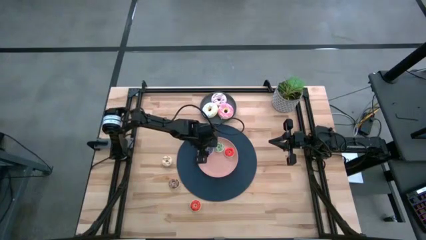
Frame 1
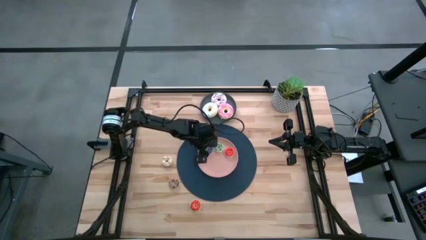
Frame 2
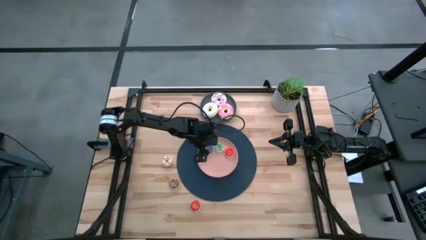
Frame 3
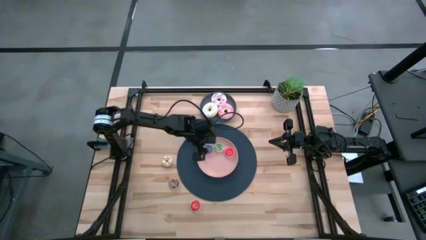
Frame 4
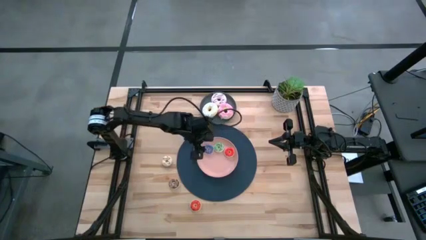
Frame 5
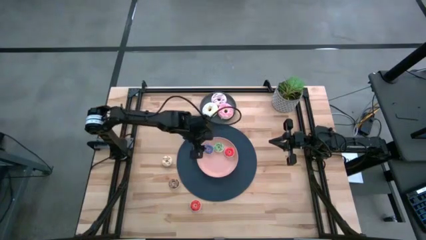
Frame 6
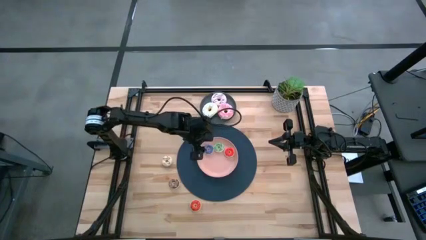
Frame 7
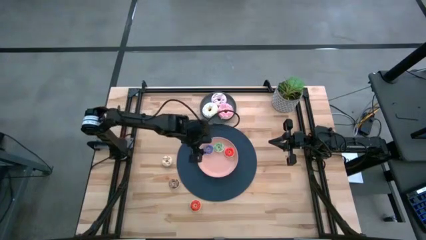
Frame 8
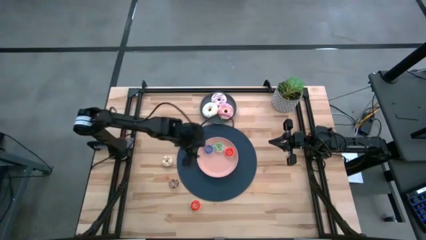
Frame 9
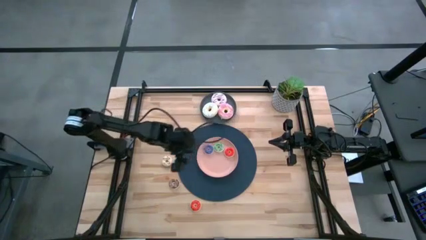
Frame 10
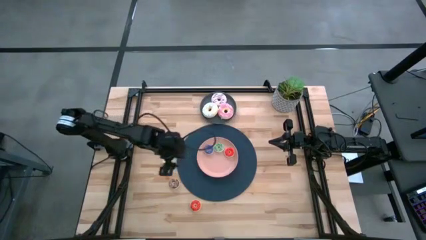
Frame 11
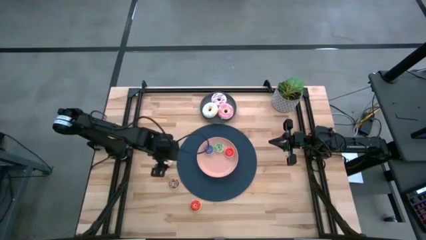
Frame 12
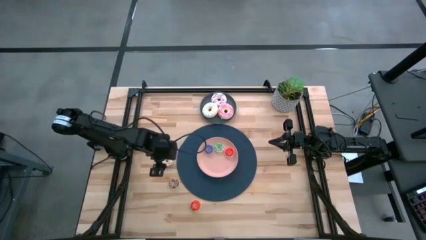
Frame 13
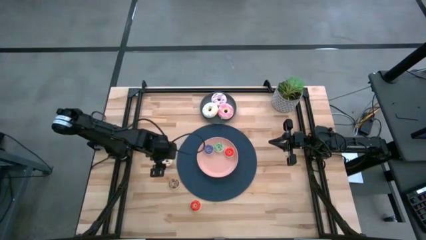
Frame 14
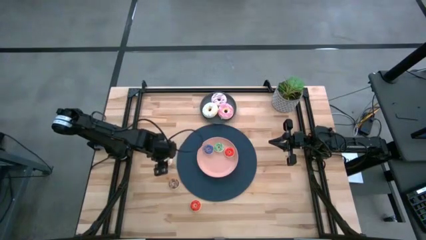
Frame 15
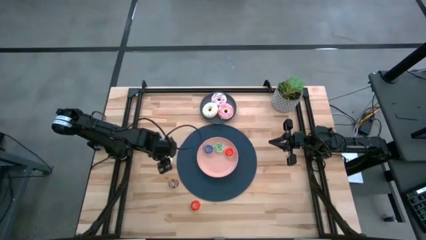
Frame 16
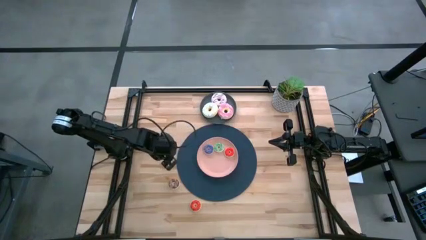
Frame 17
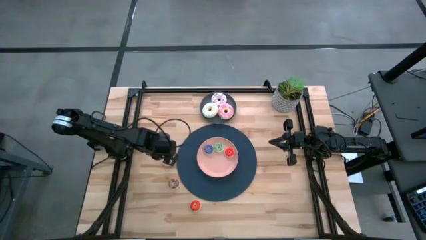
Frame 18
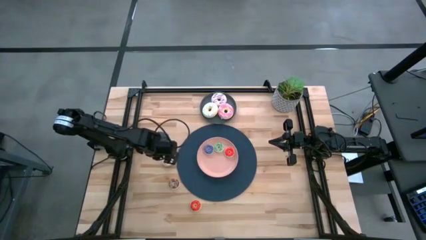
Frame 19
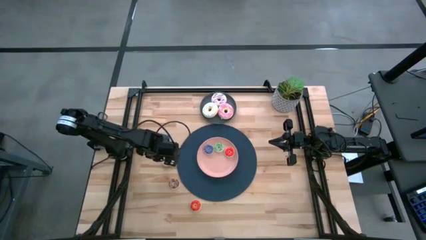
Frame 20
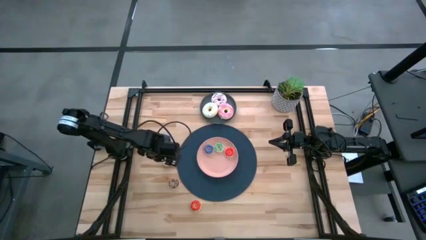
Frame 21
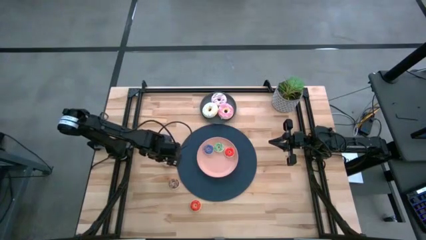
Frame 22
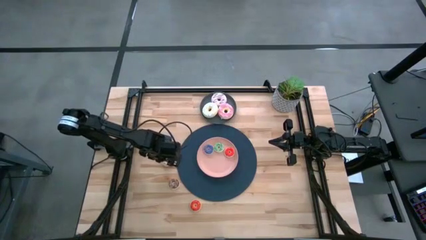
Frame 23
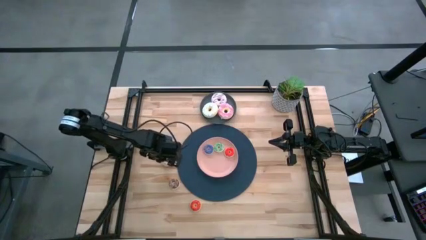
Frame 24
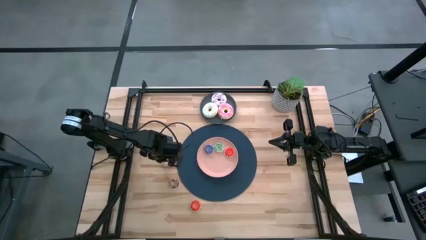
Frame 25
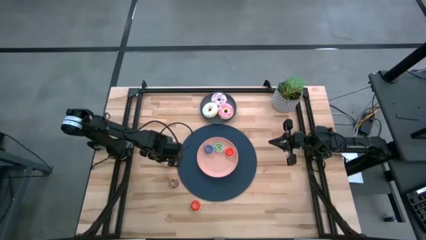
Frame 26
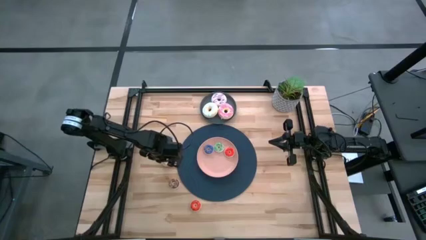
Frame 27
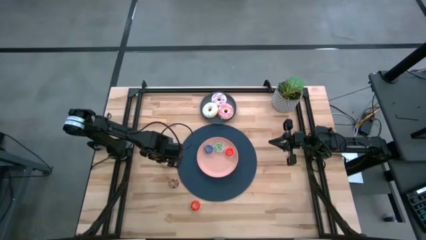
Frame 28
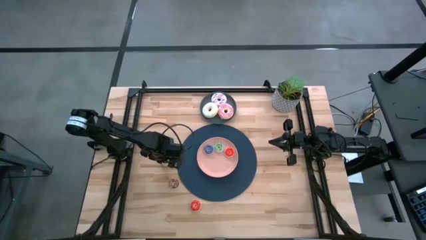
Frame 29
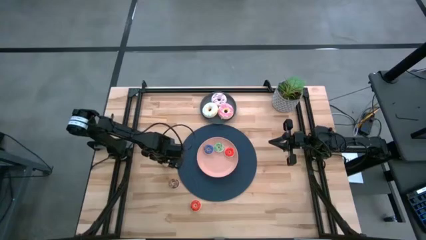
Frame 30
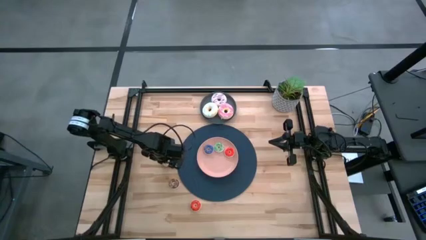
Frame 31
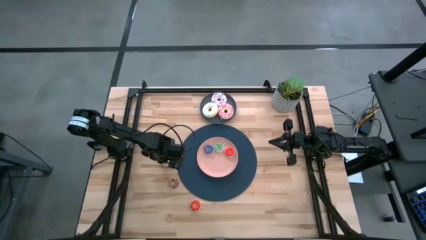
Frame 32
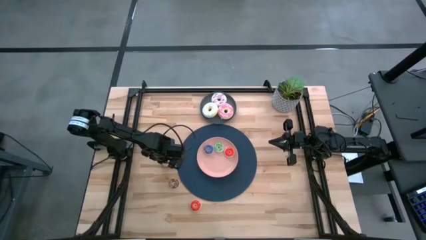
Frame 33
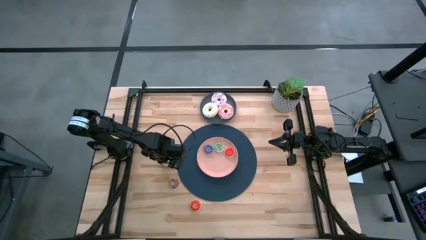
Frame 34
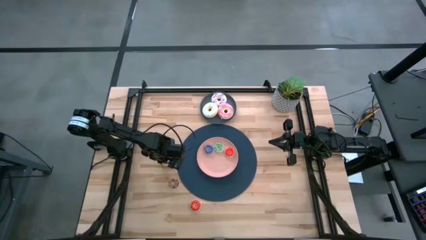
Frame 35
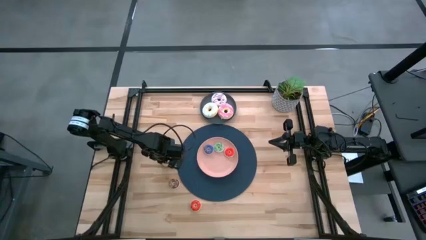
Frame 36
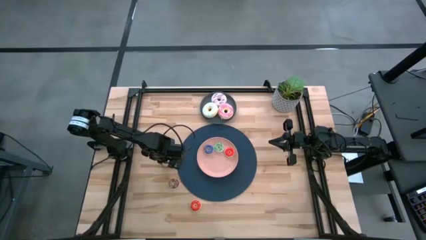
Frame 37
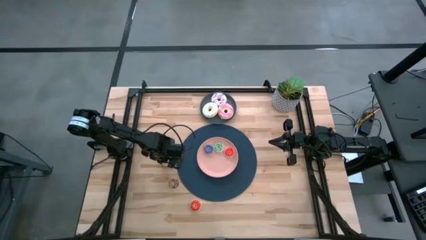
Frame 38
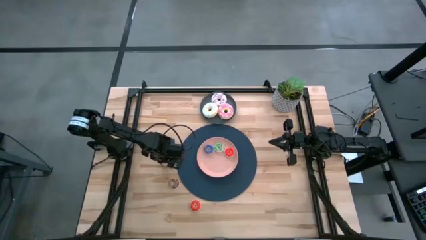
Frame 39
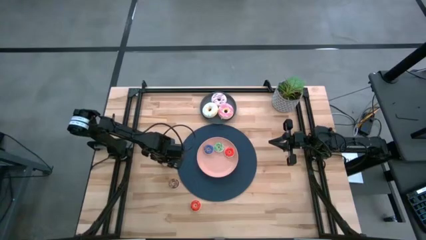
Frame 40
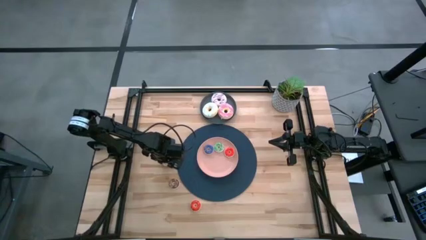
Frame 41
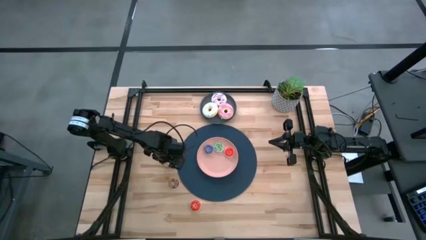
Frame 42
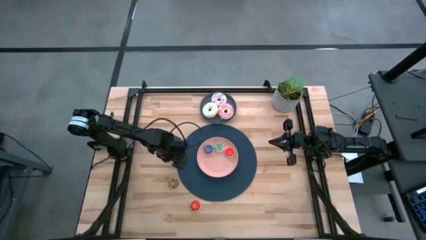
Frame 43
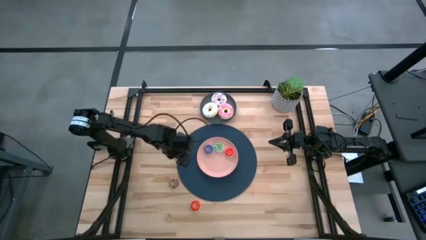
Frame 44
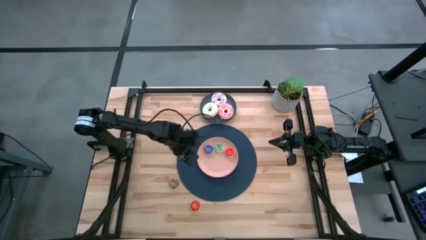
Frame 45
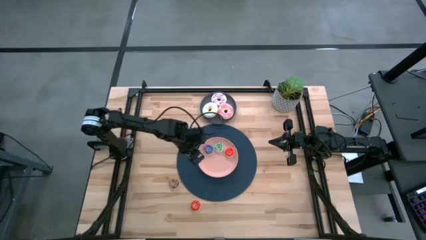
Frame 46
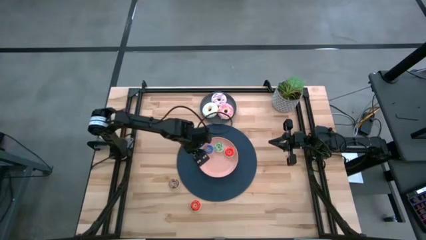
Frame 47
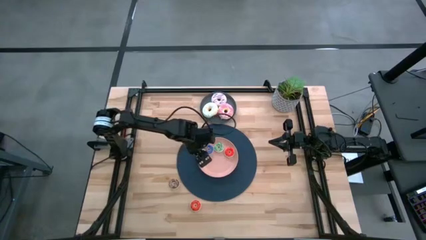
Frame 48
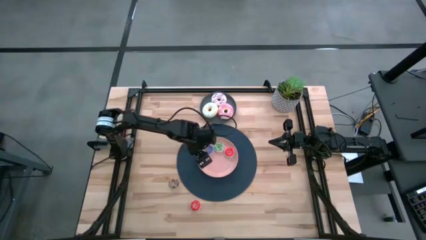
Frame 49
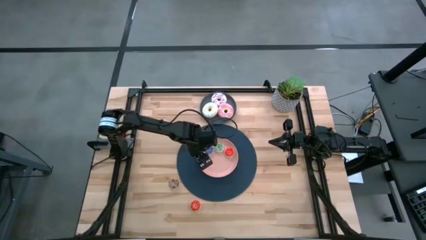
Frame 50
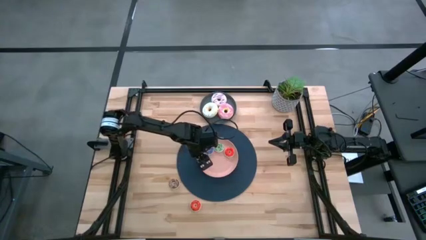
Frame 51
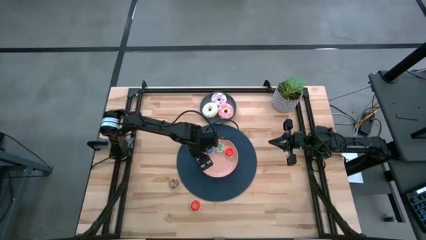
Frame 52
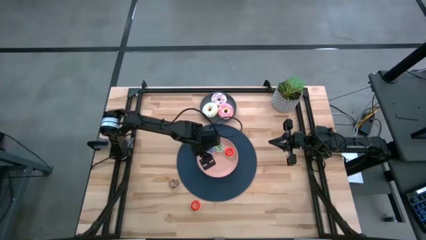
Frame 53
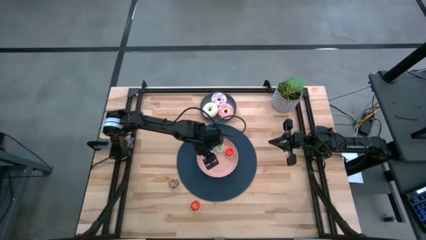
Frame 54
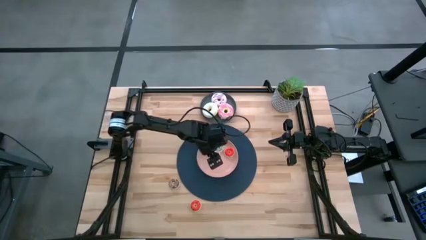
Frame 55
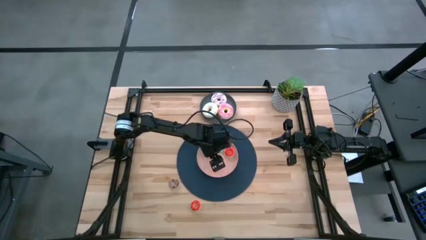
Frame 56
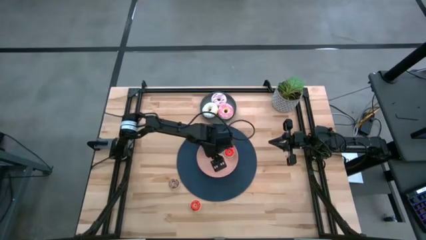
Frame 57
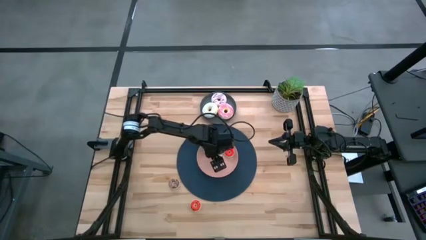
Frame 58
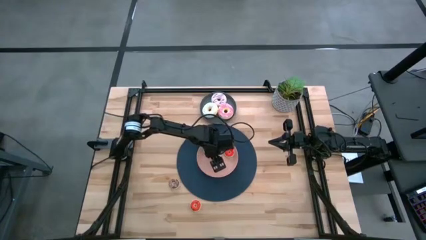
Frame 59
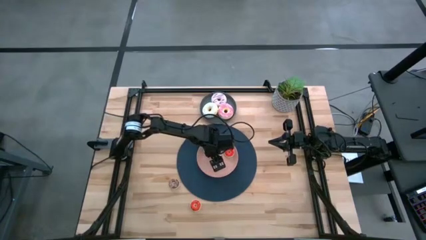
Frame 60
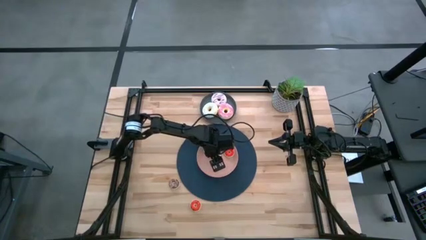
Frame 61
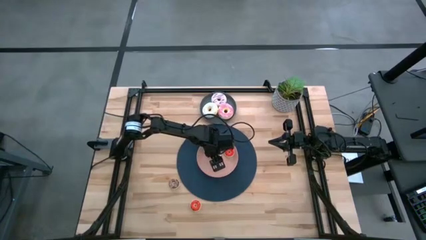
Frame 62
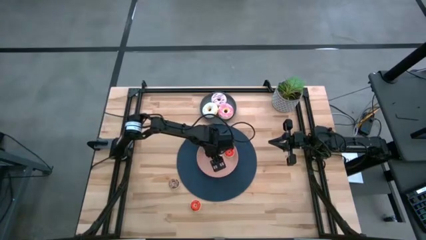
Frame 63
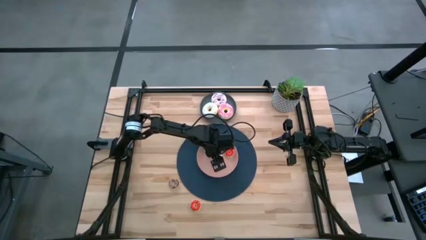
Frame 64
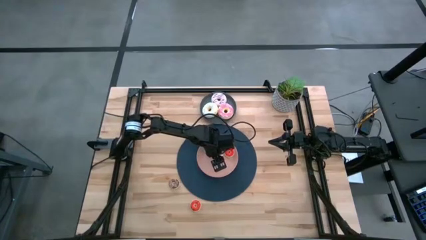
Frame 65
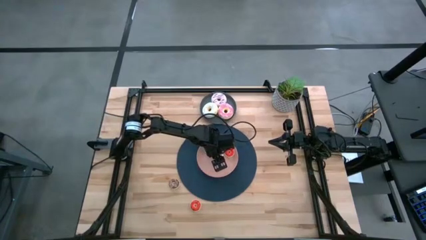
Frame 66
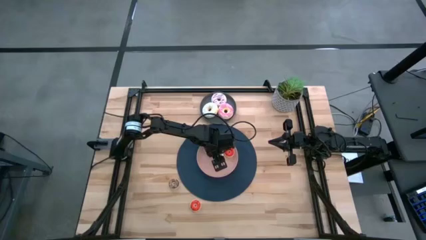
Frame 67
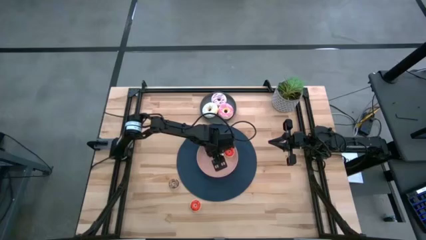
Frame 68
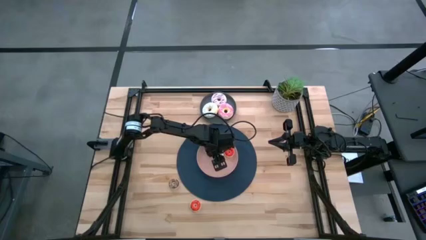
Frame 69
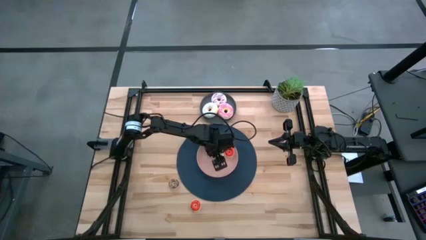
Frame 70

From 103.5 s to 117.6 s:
Task: Pick & Place donuts
Put the small white donut on the pink plate

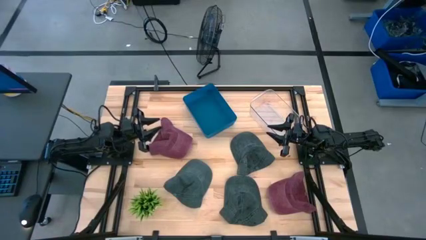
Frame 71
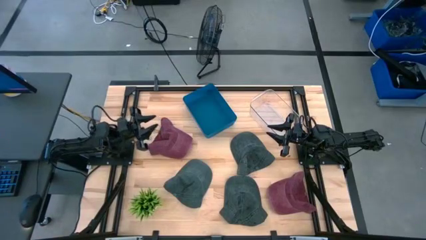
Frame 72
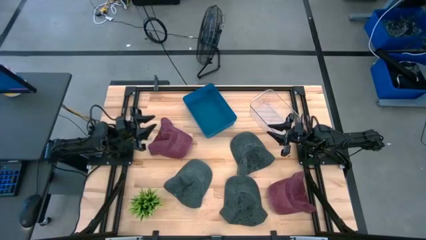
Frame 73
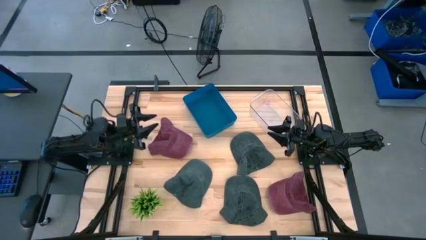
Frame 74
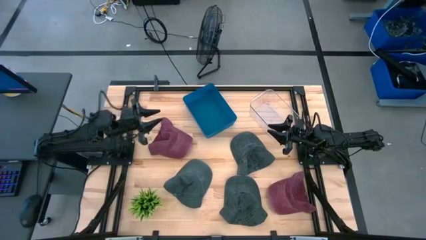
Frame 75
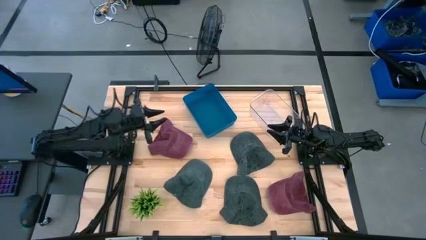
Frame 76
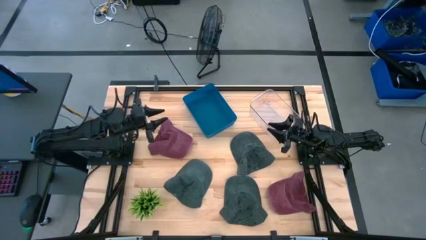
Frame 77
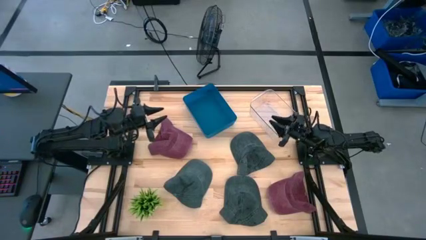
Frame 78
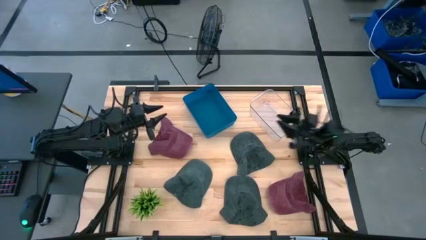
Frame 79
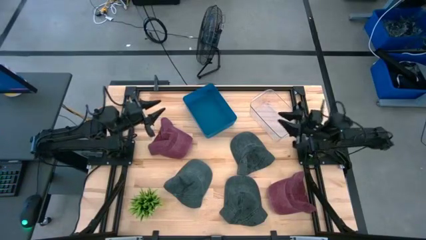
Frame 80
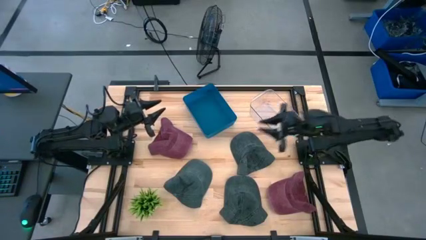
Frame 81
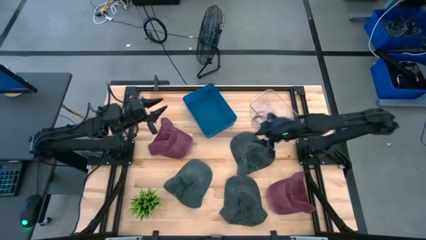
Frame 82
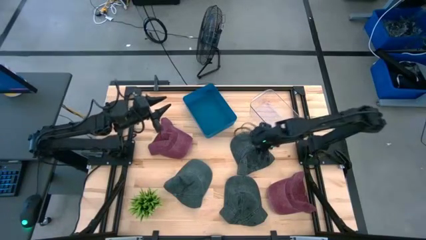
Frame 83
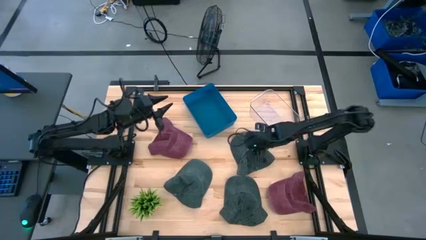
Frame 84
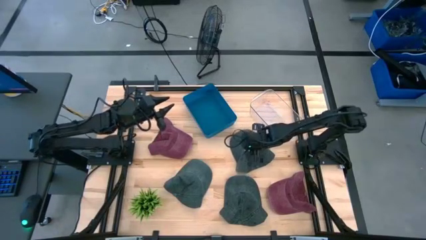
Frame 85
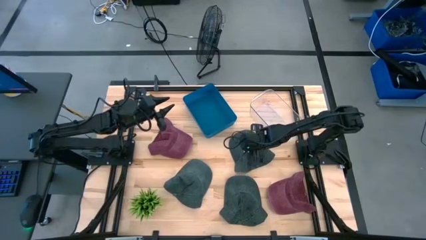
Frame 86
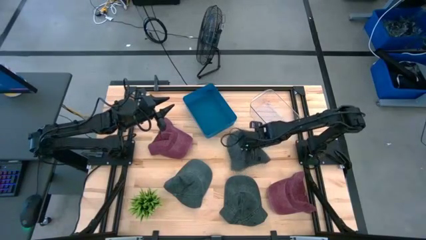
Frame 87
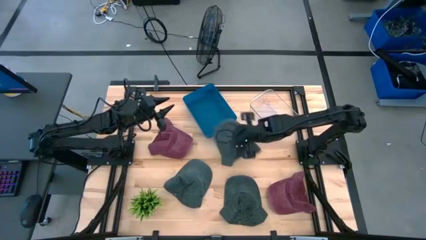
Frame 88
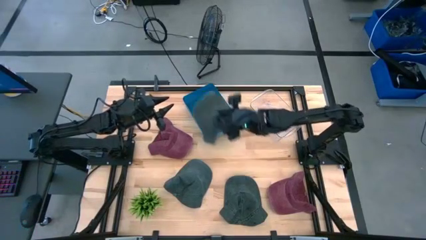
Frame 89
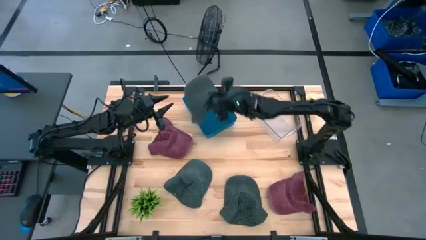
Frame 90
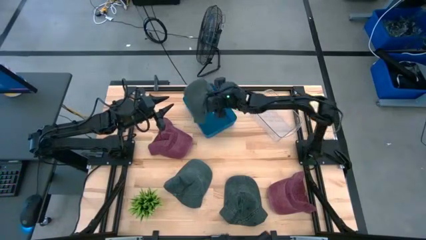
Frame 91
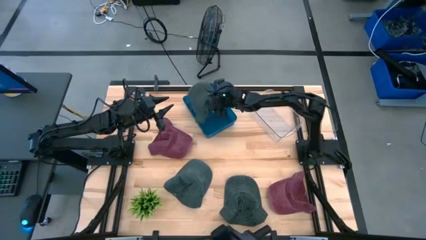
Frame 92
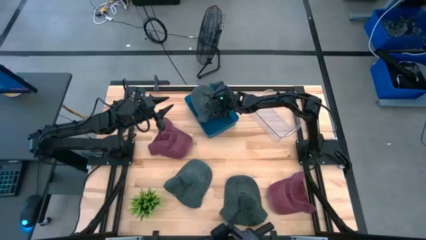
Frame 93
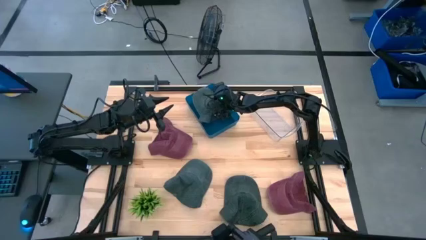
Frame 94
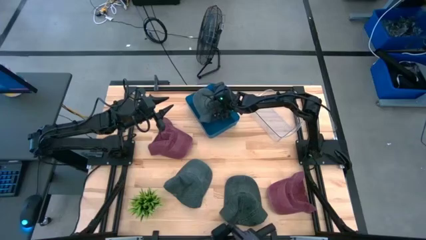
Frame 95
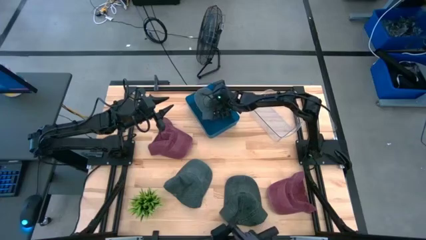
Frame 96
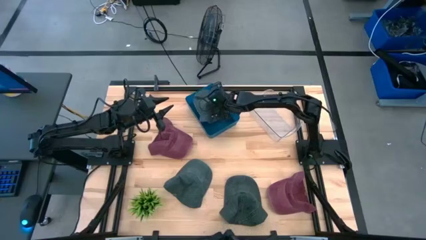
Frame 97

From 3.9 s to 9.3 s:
Task: Pick & Place hat
Put the top gray cap into the blue bin
